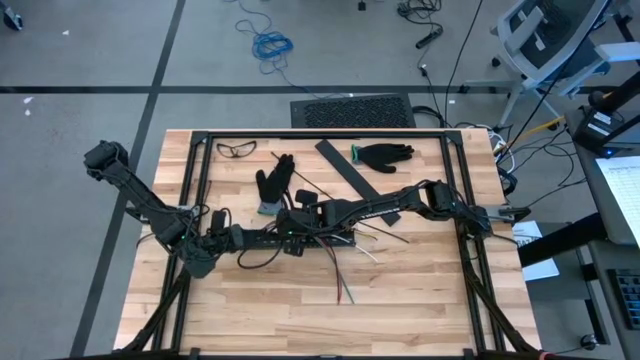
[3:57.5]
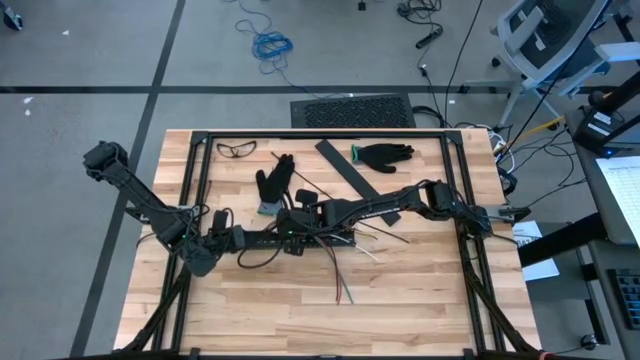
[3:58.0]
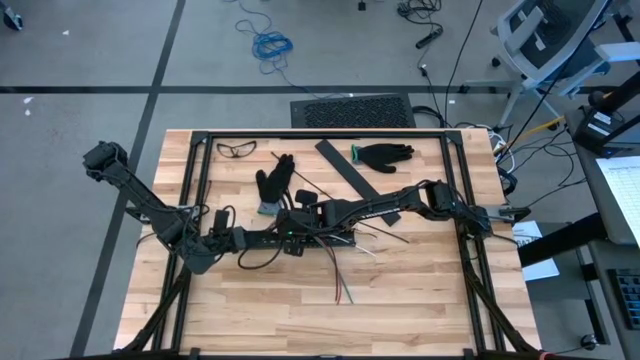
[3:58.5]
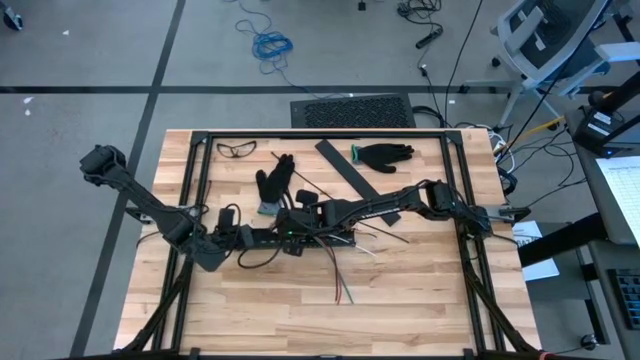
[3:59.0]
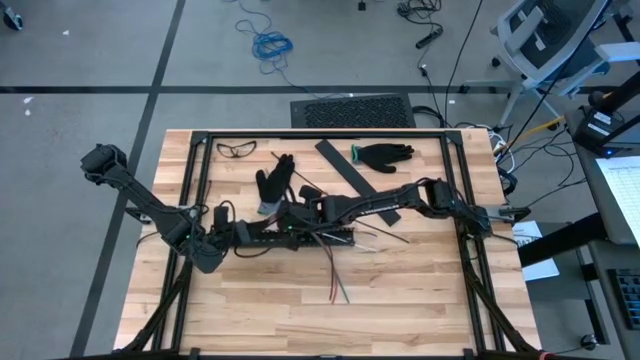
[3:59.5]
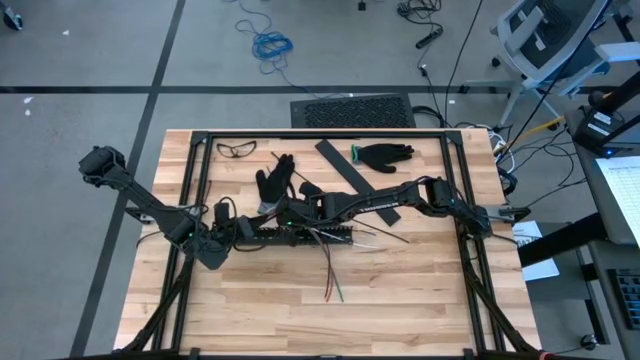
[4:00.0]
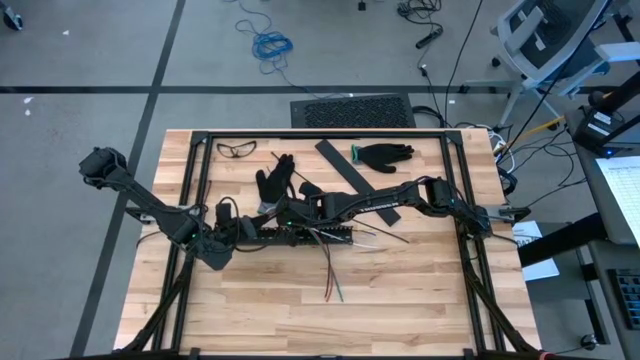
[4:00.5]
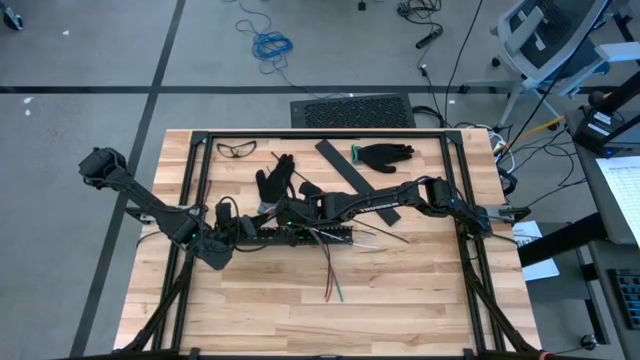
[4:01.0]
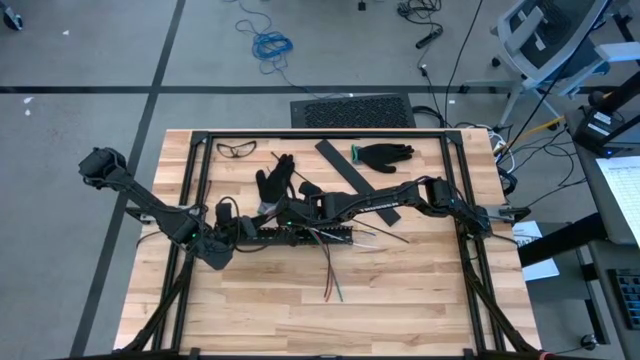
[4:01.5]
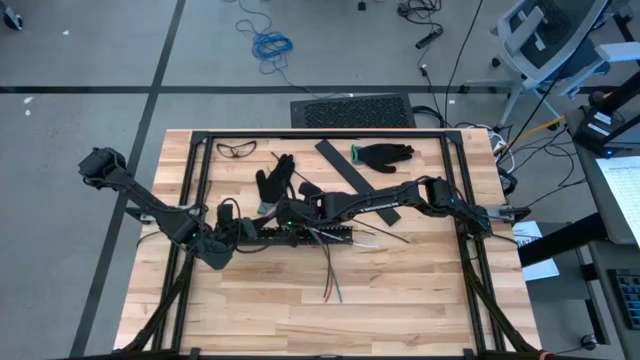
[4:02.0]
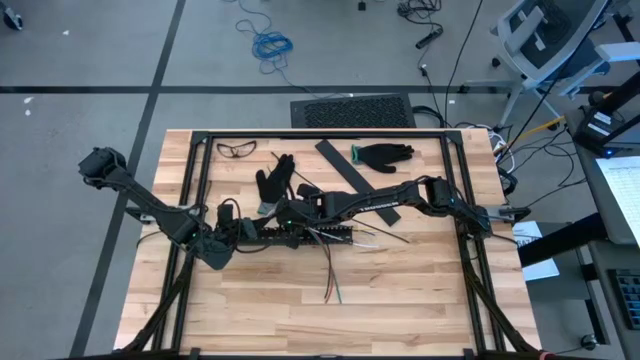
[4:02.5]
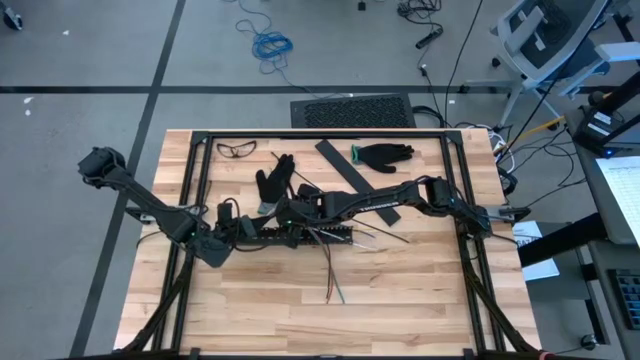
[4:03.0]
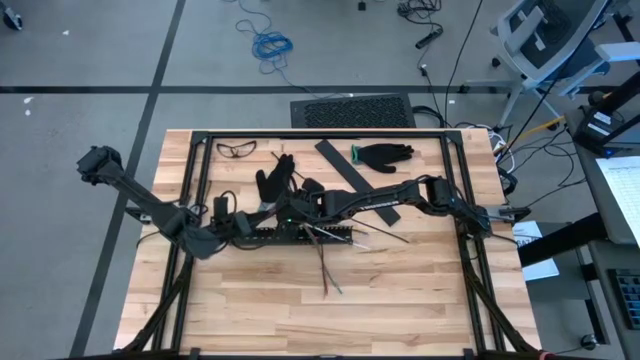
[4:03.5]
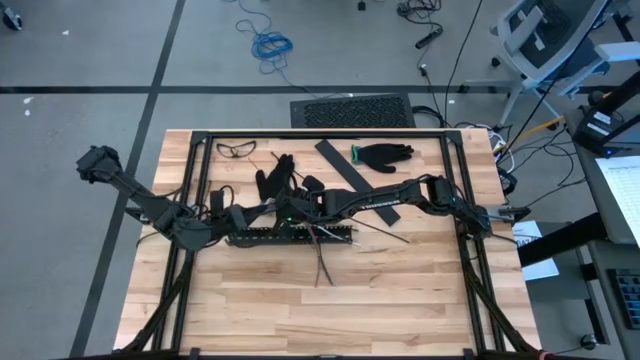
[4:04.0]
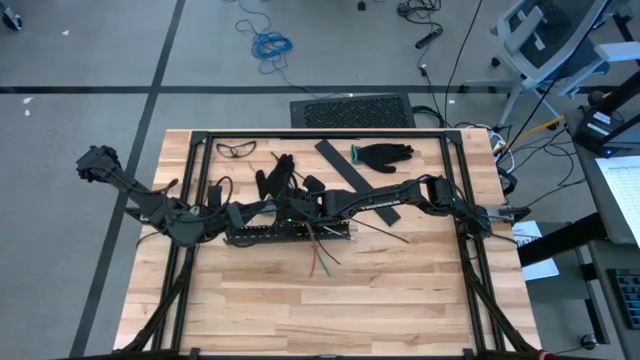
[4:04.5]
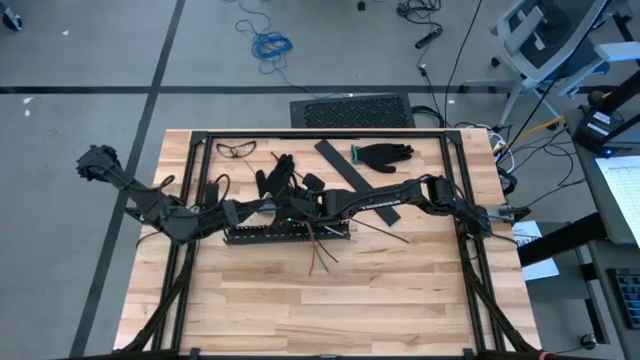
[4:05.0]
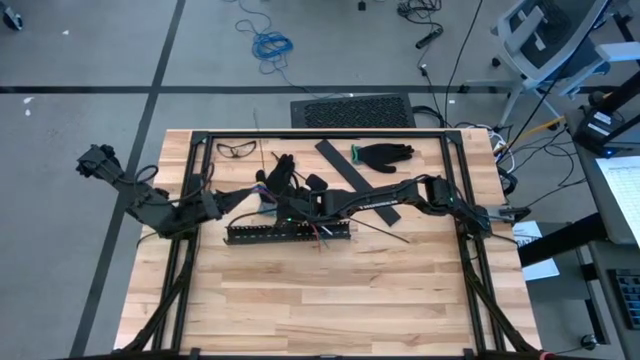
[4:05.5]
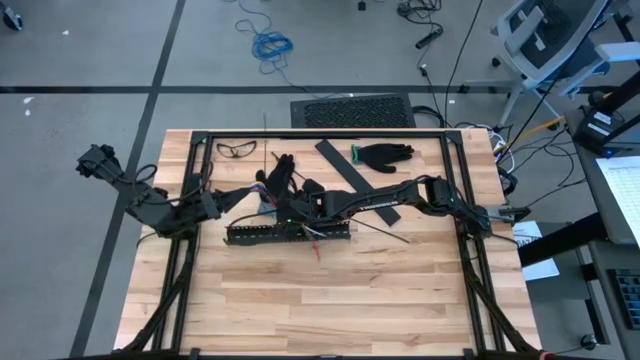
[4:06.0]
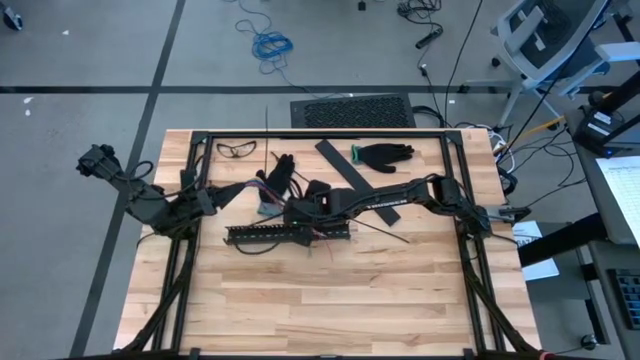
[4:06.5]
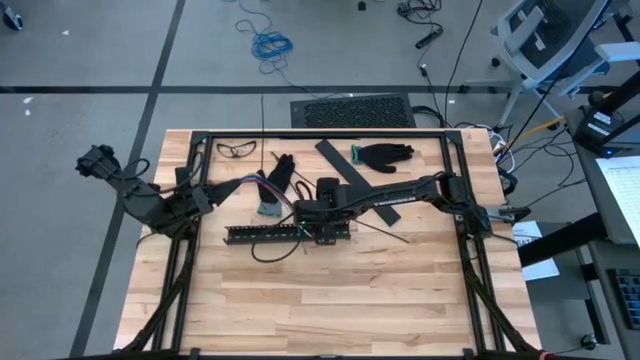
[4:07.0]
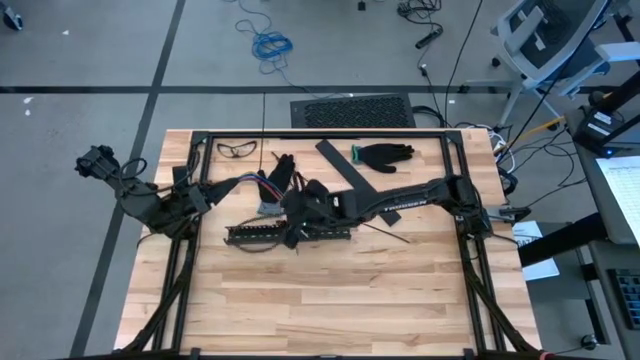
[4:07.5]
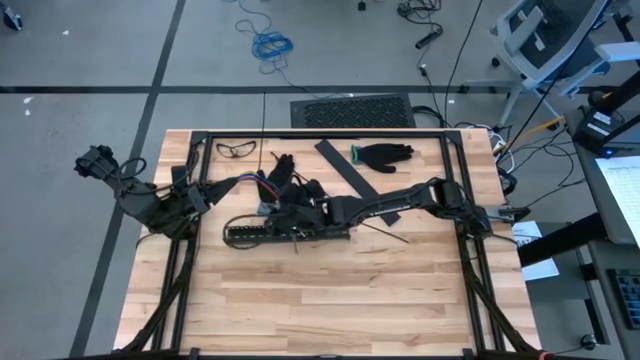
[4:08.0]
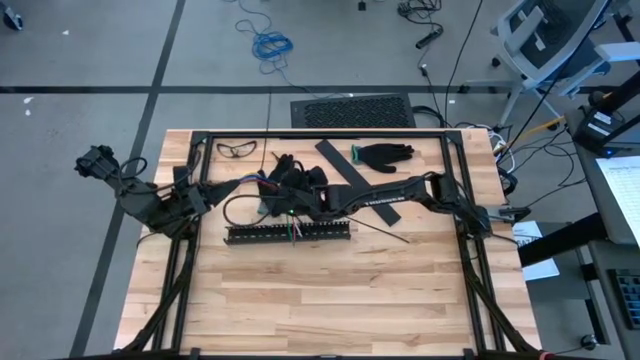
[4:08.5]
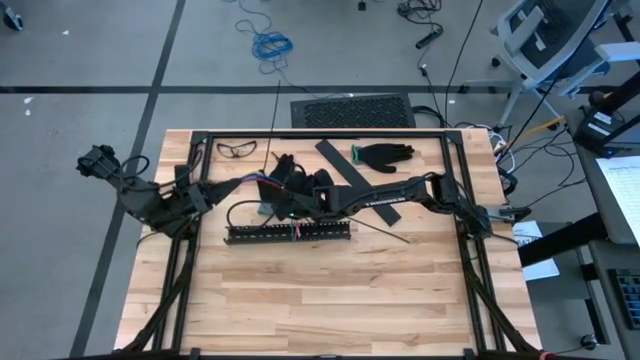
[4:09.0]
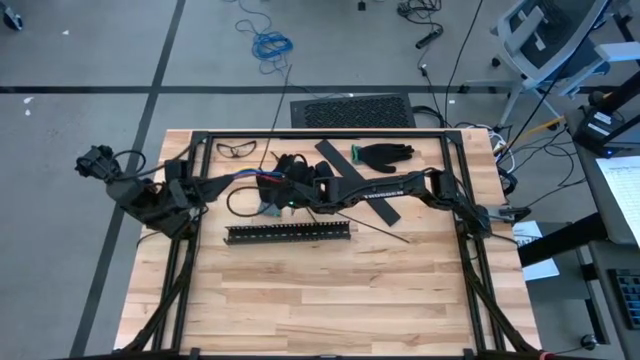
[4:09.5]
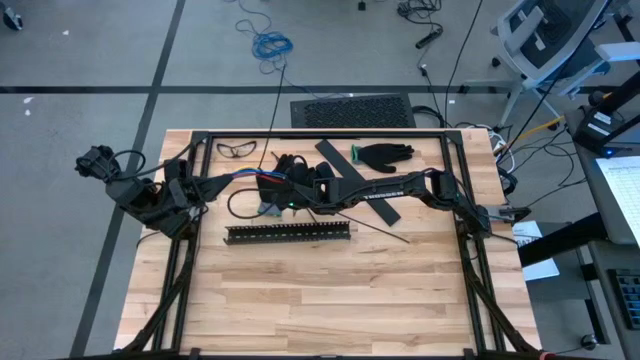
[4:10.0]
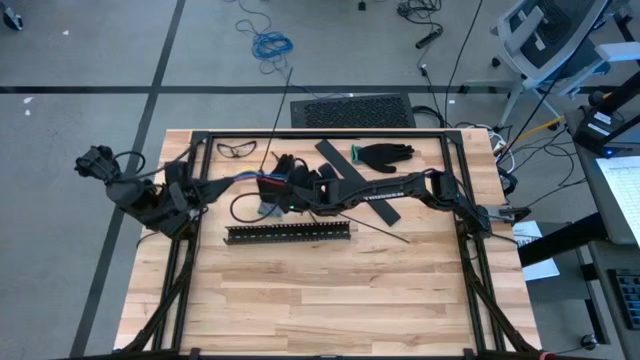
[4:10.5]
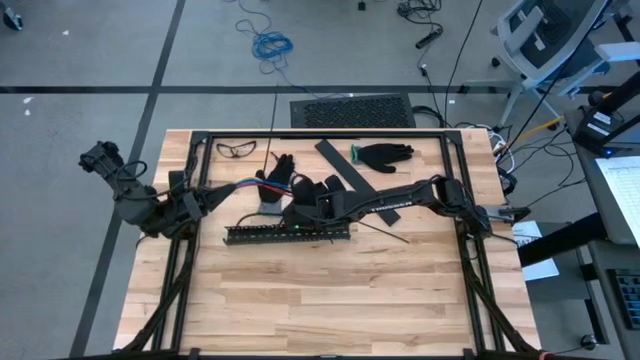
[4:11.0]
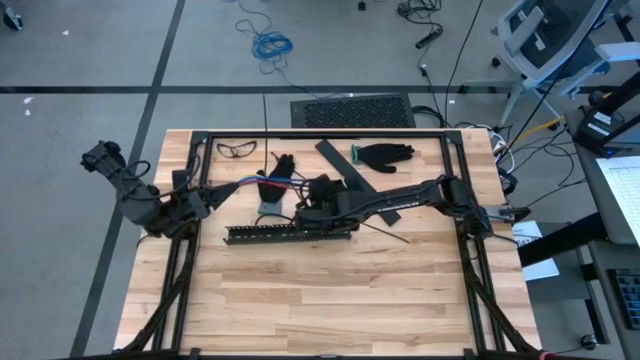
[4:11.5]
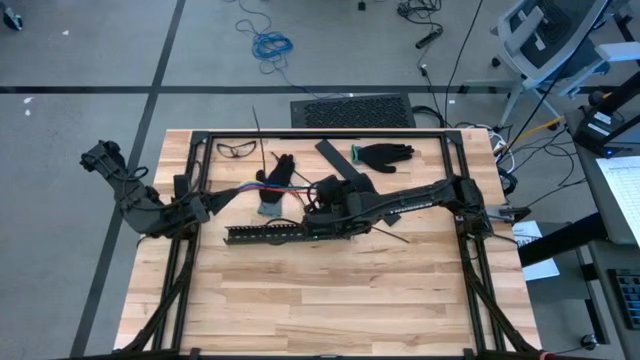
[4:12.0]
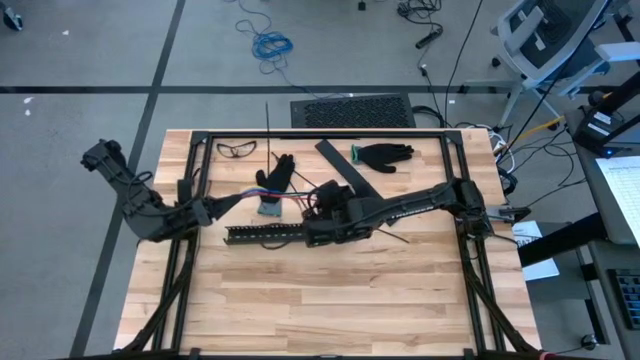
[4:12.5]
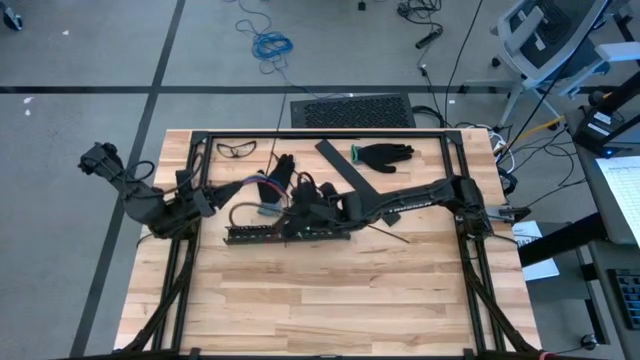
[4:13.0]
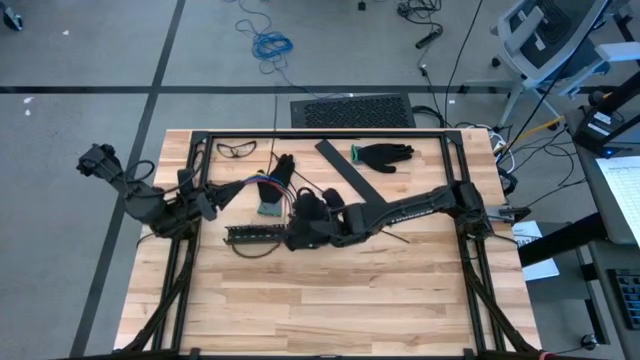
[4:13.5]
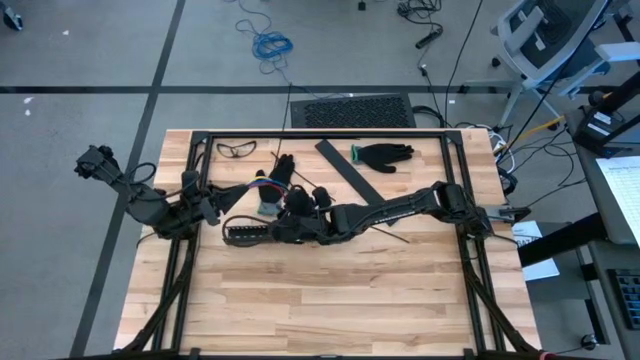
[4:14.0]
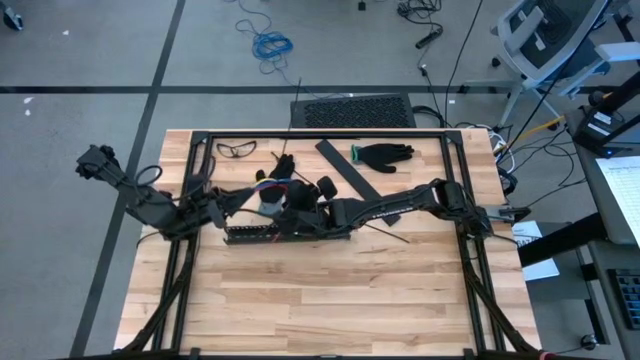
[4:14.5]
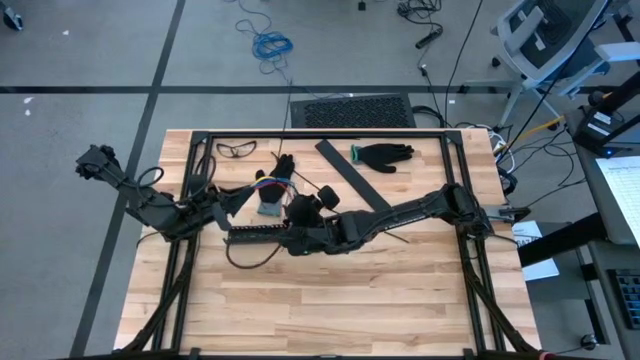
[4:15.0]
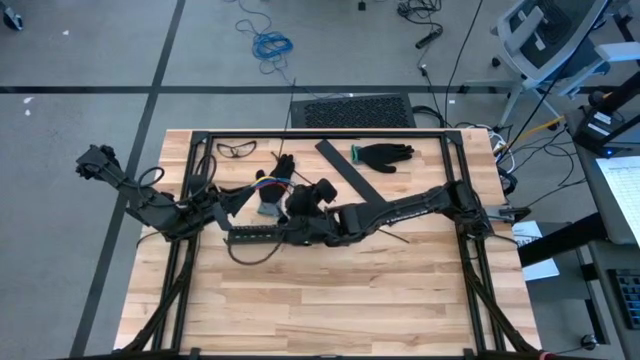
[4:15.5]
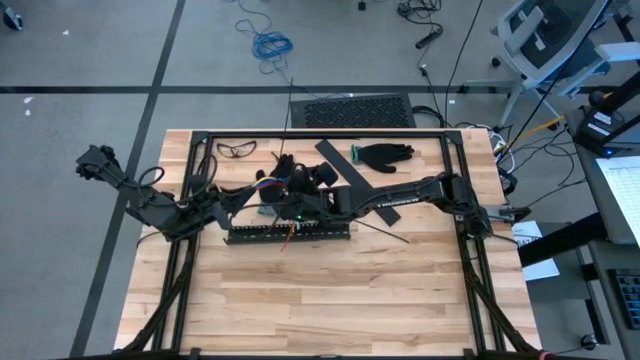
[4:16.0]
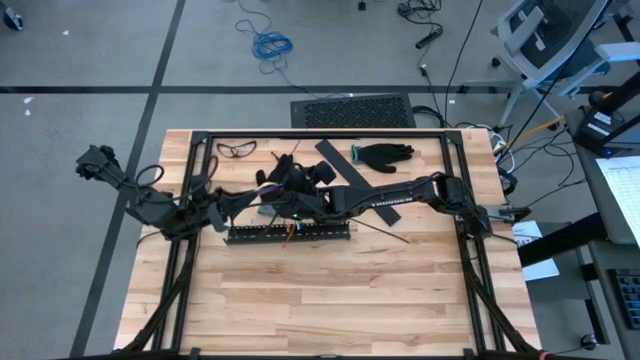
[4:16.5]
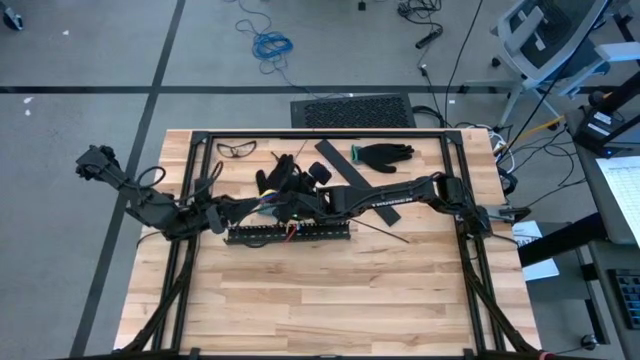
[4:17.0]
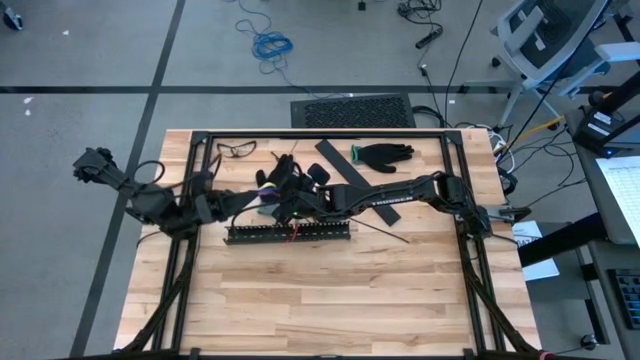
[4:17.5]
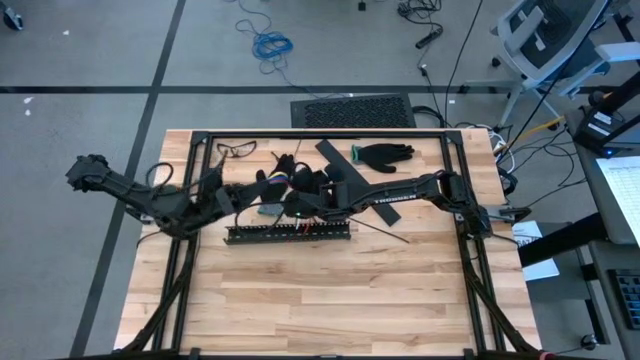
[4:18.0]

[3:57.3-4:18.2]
Task: Ziptie cables
Put the ziptied cables in the black cable duct

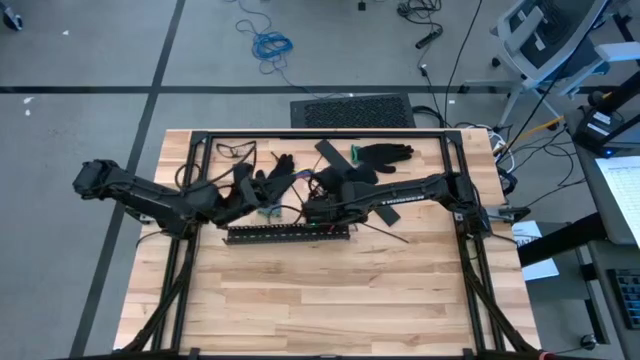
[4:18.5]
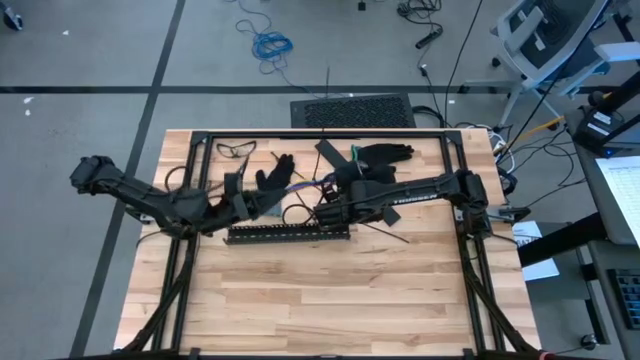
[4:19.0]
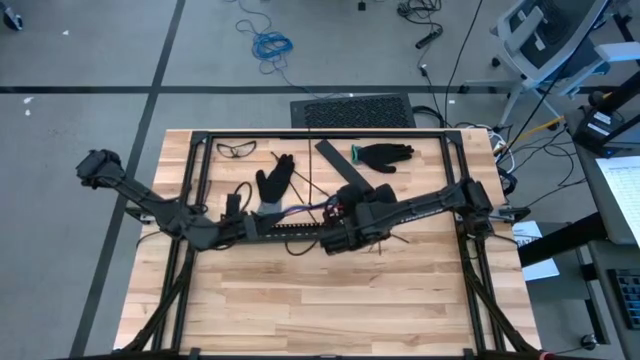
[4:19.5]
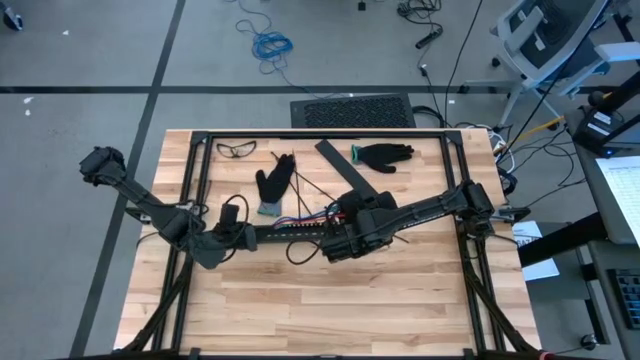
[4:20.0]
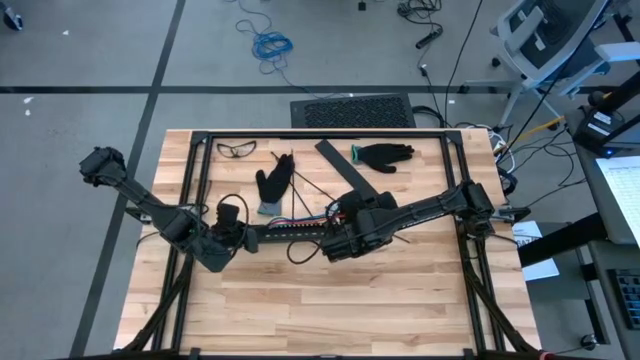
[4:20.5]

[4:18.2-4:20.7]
Put the ziptied cables in the black cable duct
